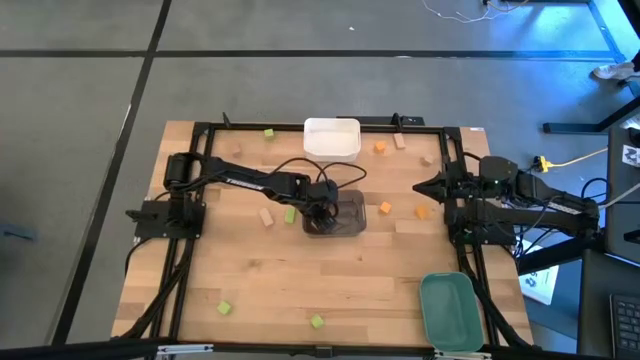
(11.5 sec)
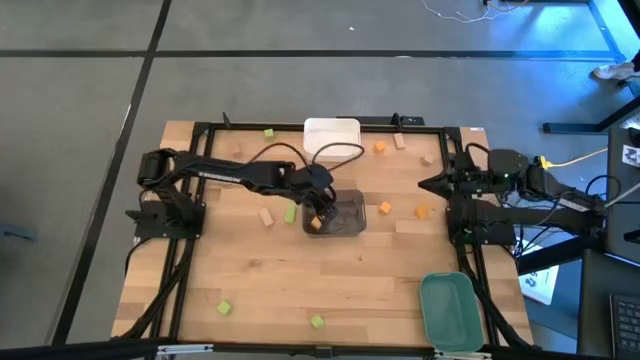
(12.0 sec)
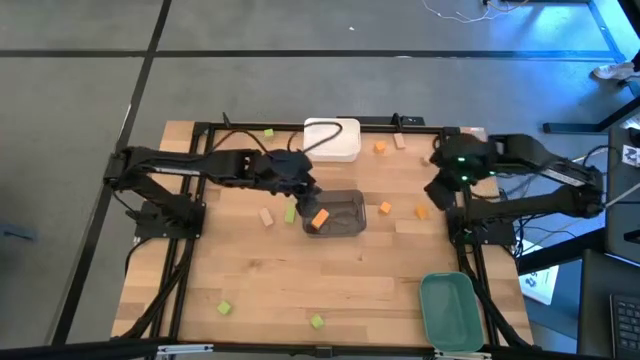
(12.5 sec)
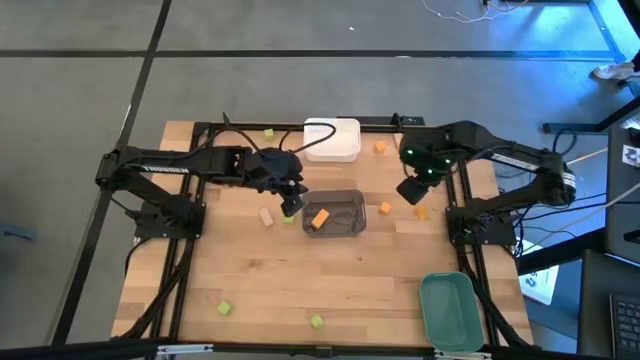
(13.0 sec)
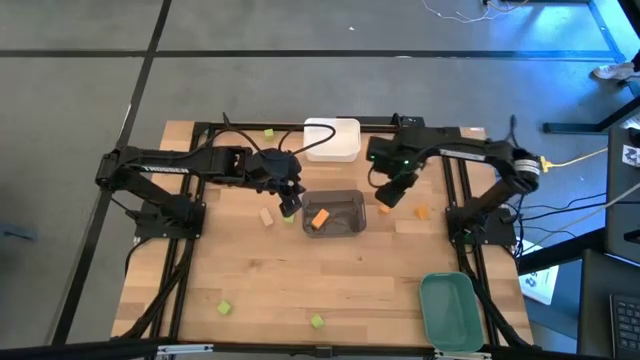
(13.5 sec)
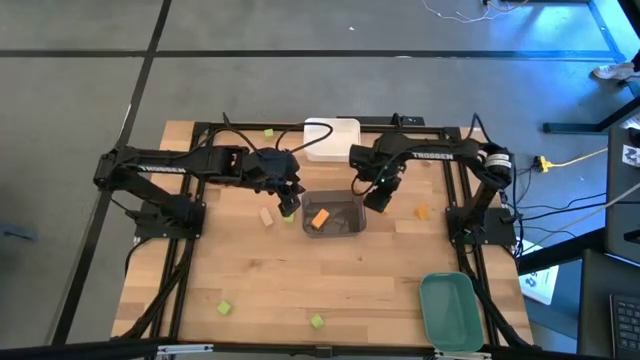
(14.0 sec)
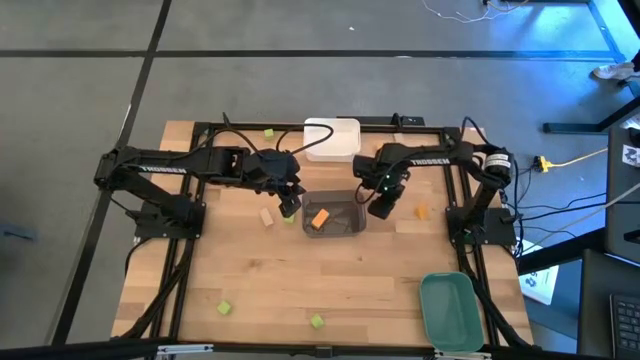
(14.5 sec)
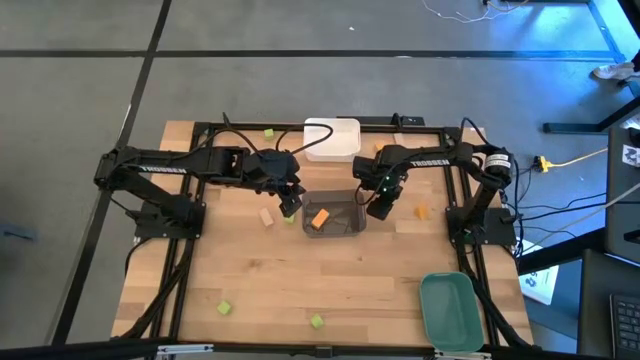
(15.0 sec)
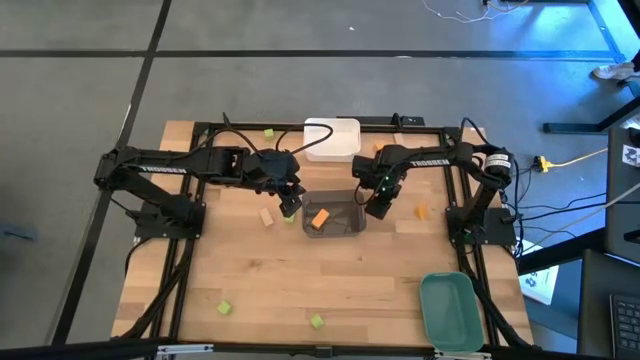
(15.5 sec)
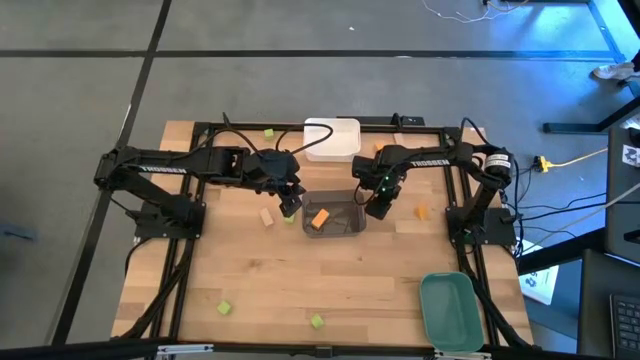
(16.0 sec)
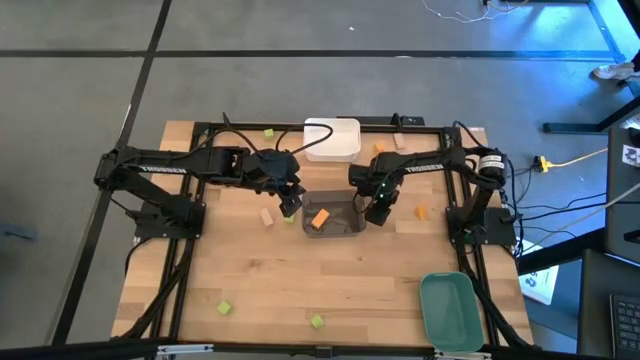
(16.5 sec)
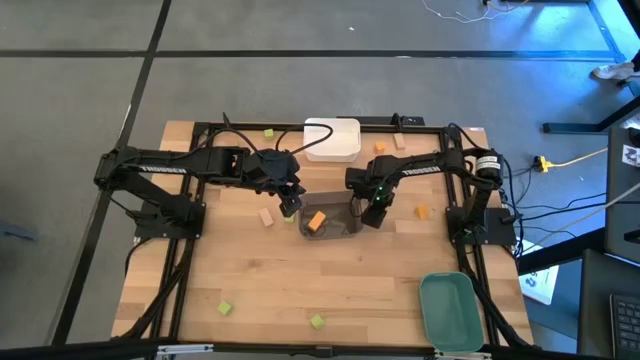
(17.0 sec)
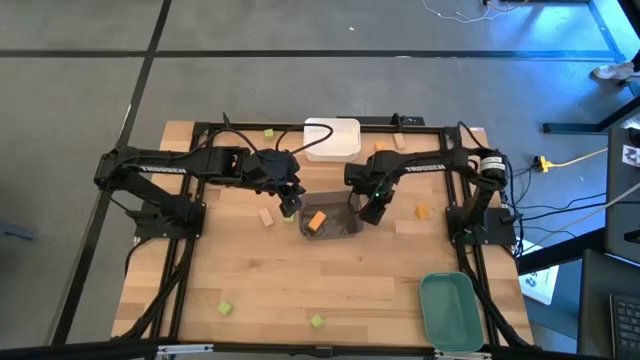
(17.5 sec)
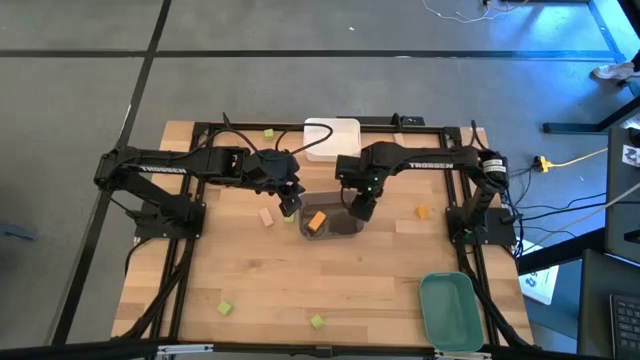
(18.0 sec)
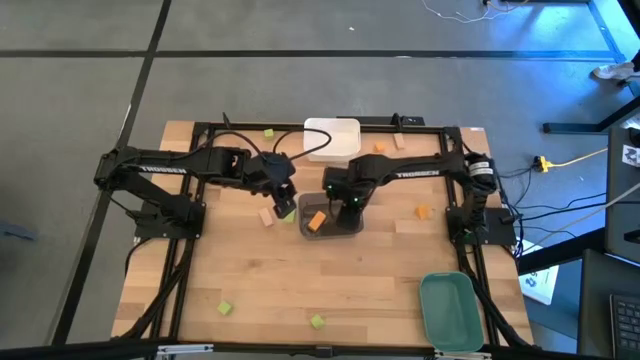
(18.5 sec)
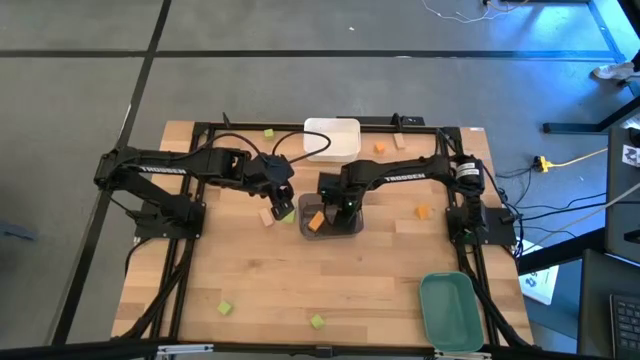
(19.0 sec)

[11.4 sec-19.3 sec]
Task: Sort & place blocks by color
Put the orange block into the black bin

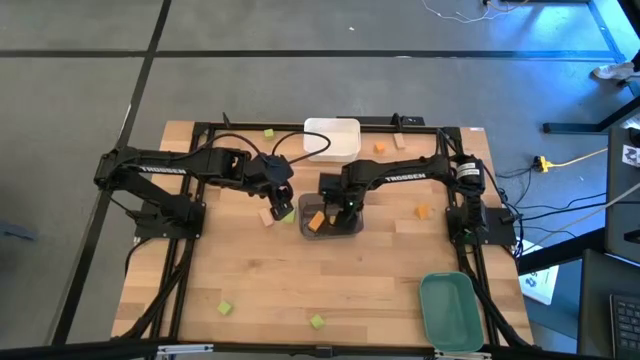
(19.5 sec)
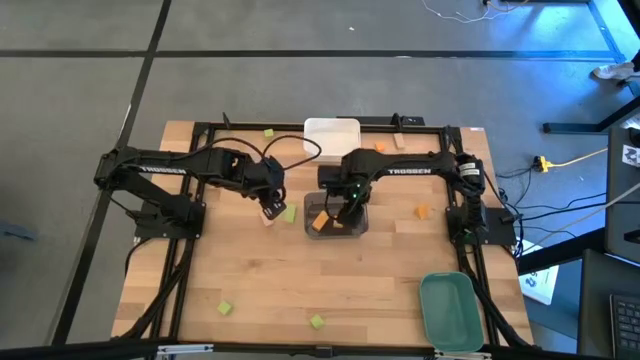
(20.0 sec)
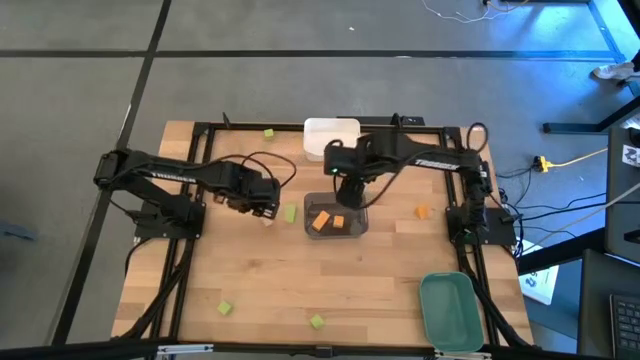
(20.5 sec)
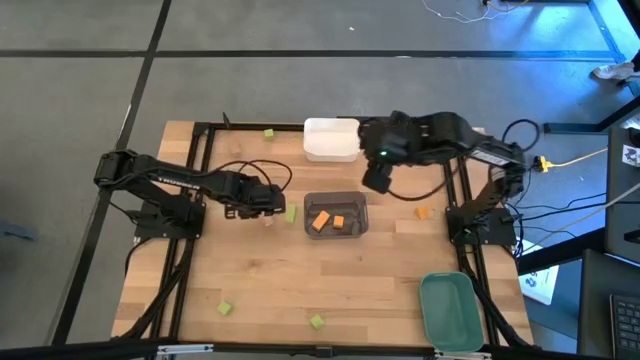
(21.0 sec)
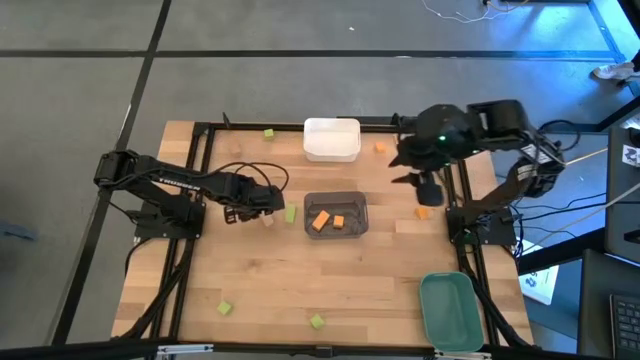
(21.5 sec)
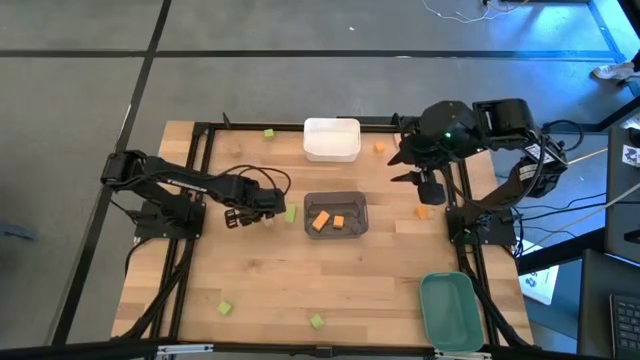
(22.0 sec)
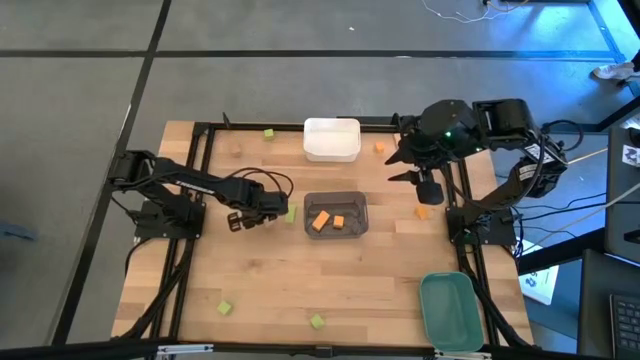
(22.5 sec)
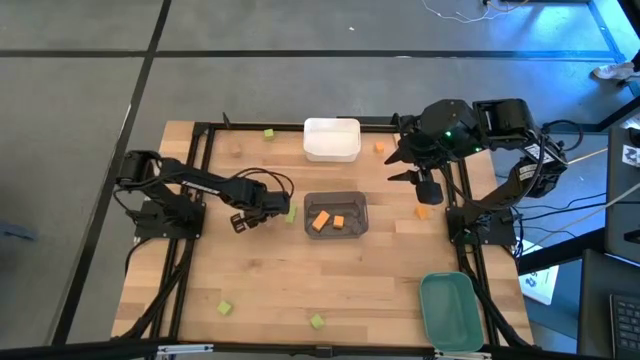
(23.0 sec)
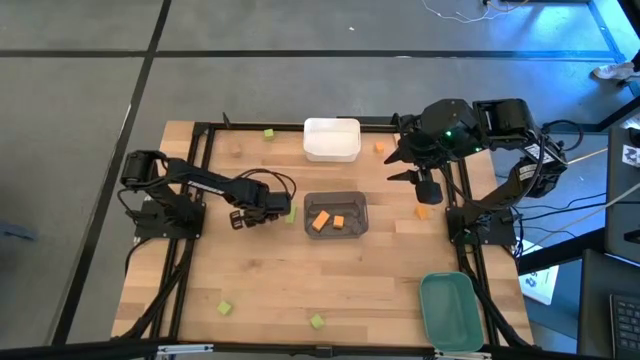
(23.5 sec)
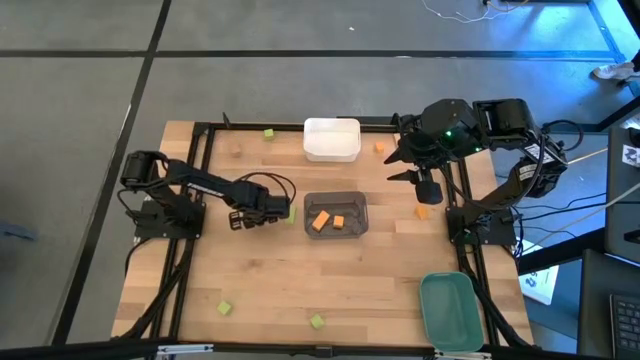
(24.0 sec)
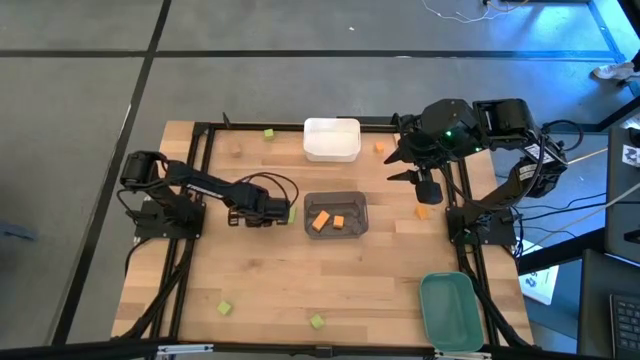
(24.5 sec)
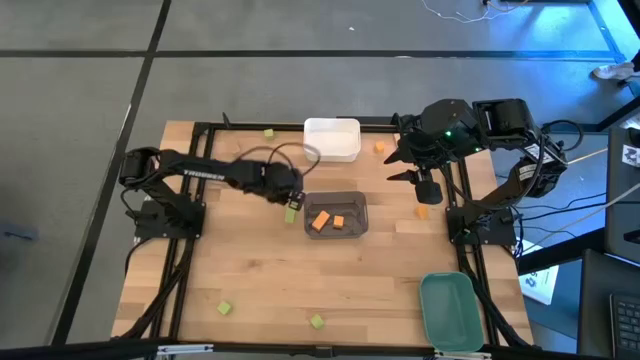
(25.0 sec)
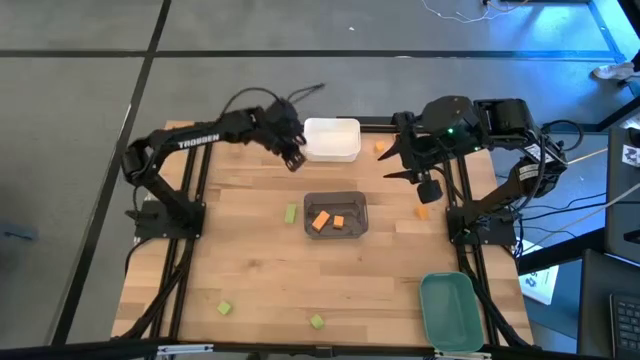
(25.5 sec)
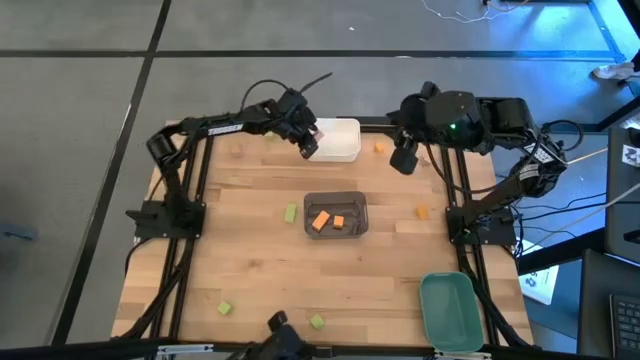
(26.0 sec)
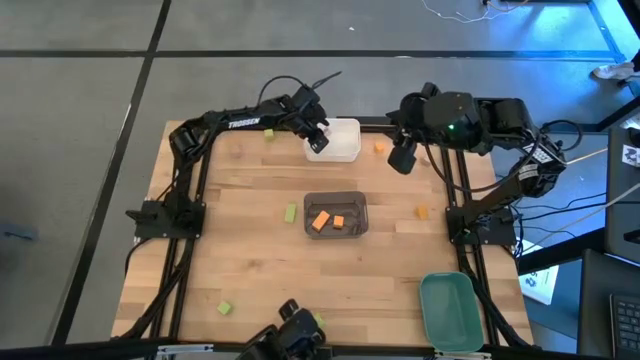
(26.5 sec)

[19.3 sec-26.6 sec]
Put the brown block into the white bin

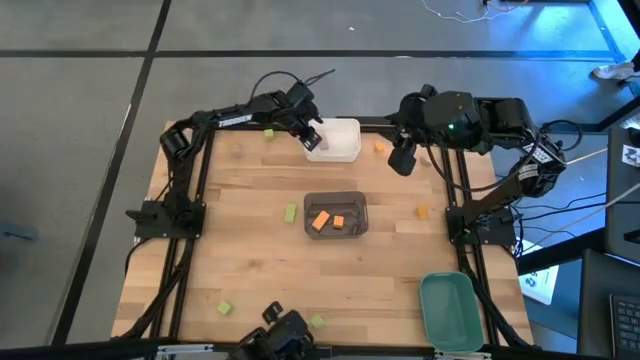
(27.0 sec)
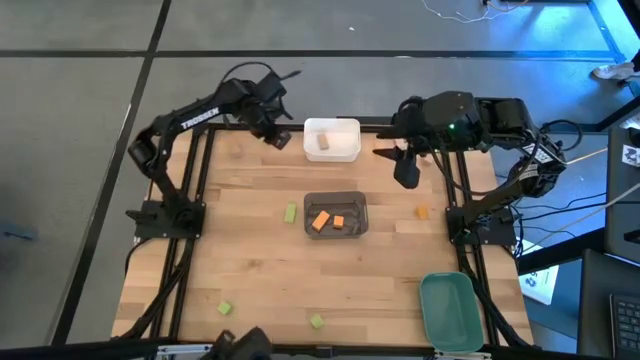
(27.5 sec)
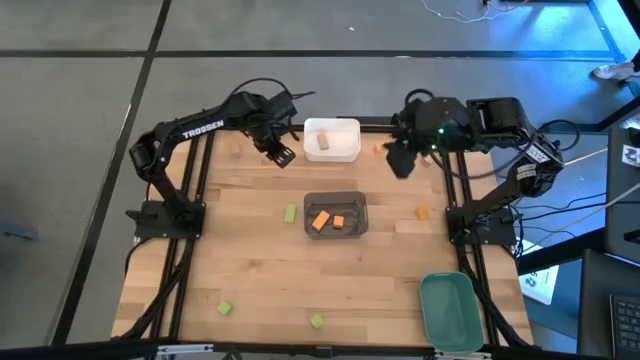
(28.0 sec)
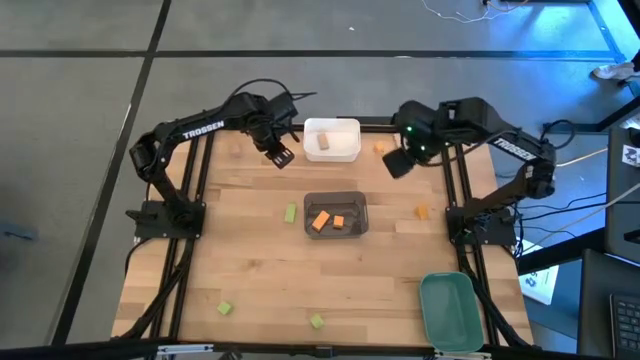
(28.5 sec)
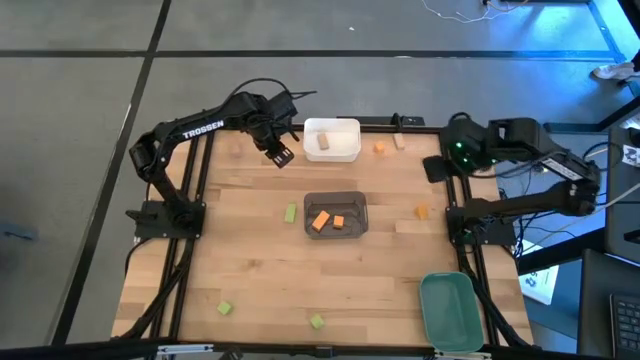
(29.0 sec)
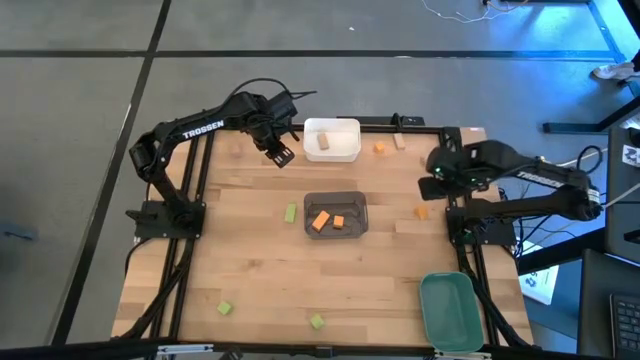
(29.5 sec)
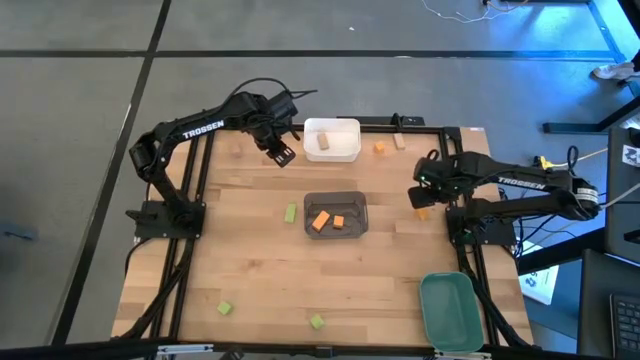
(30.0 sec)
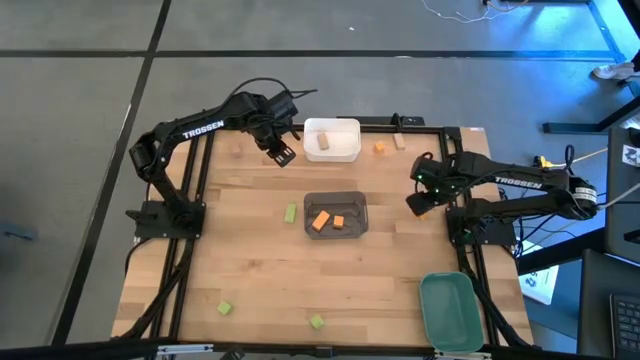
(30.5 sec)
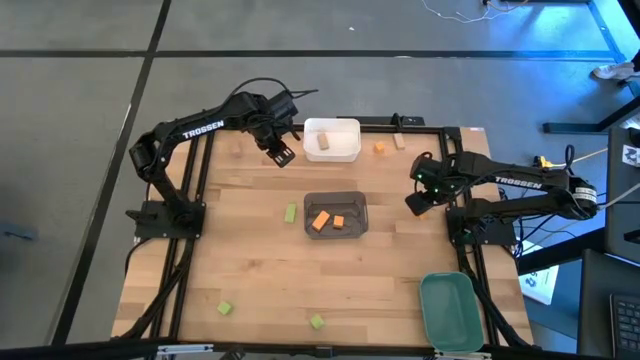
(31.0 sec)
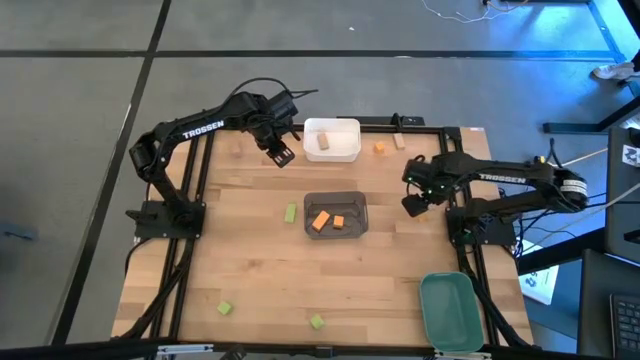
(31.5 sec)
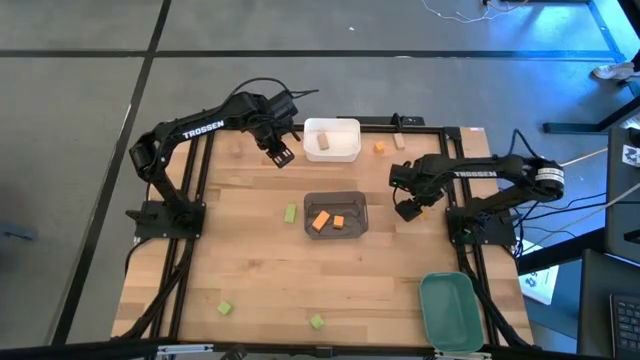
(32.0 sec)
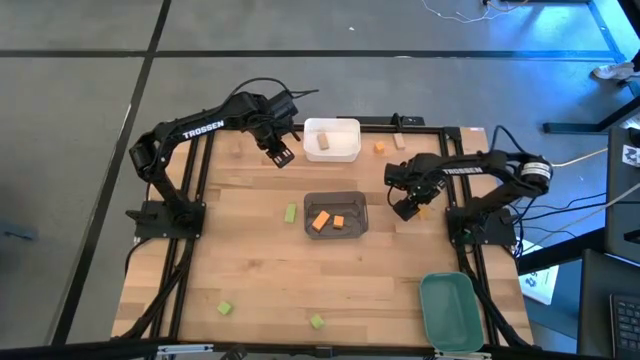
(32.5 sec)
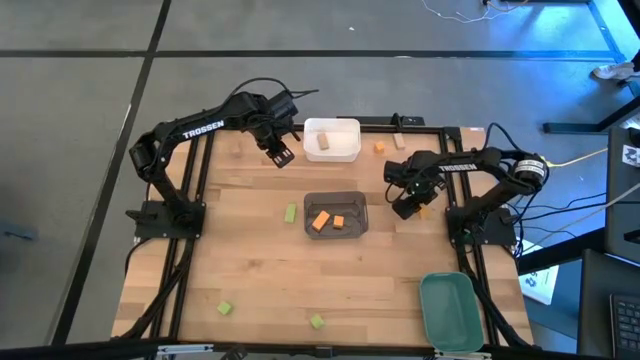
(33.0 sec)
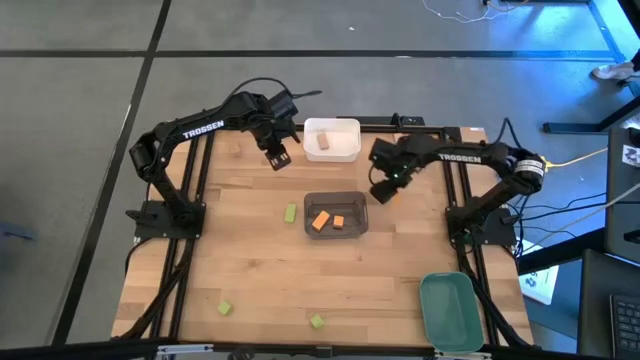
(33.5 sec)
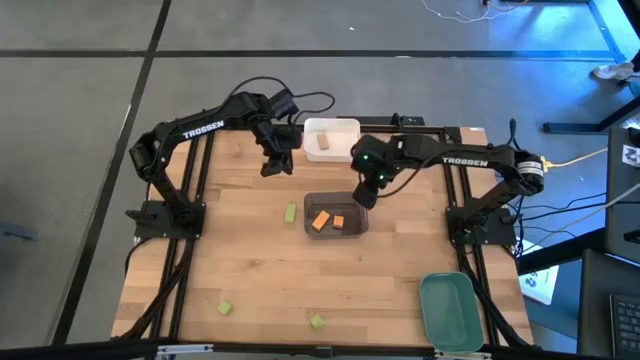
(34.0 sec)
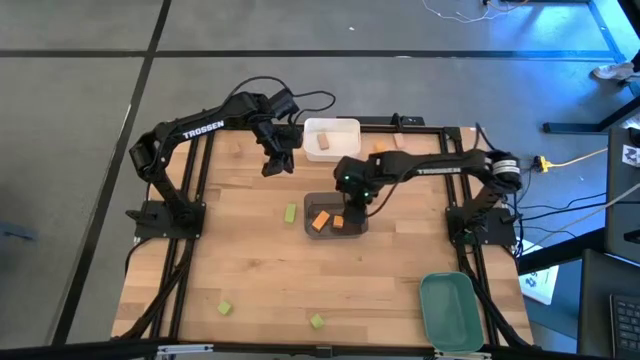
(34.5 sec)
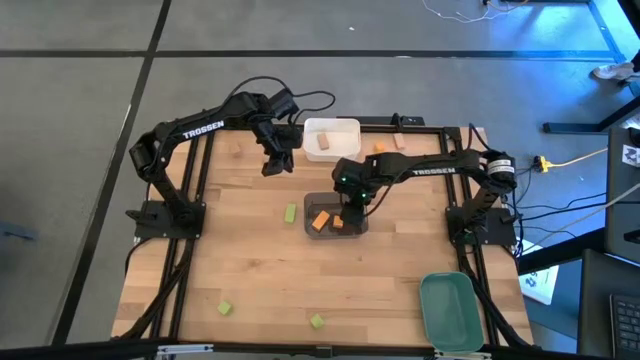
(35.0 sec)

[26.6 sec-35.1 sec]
Put the orange block into the black bin
